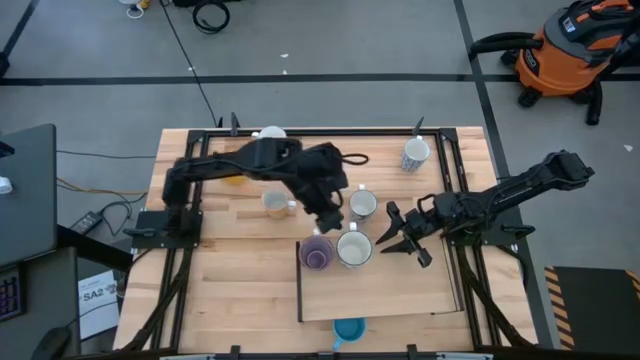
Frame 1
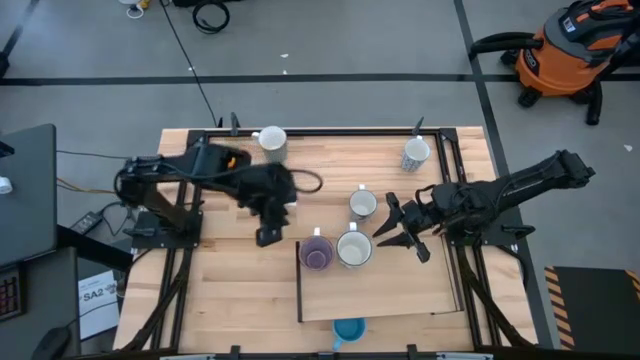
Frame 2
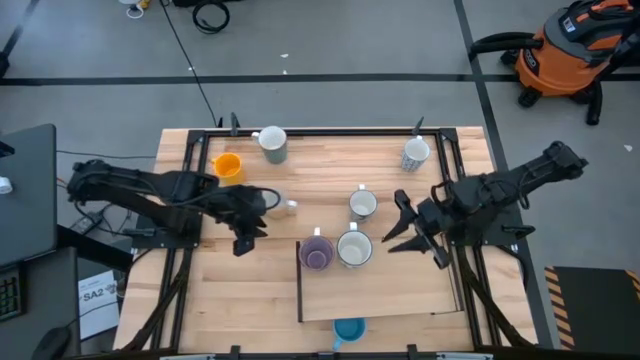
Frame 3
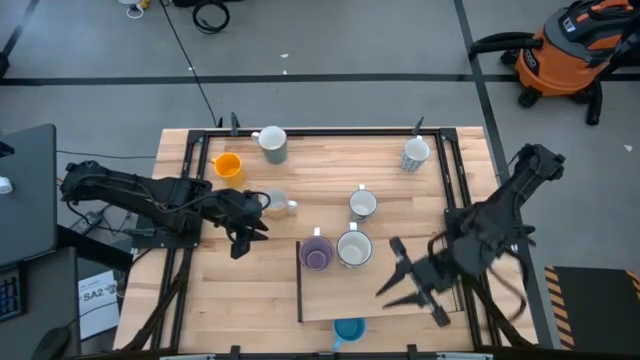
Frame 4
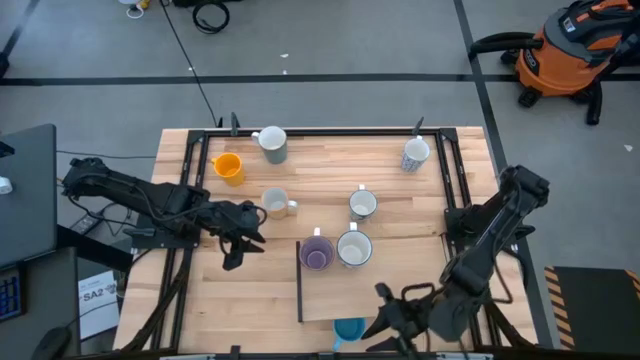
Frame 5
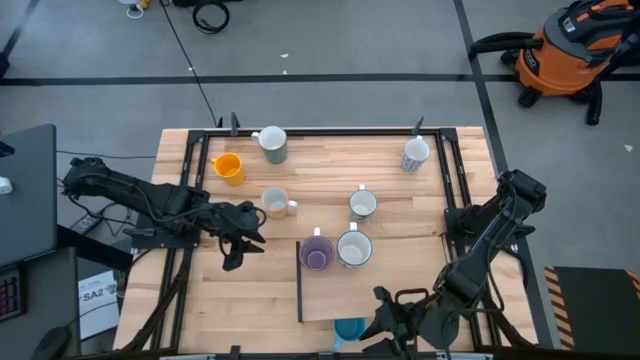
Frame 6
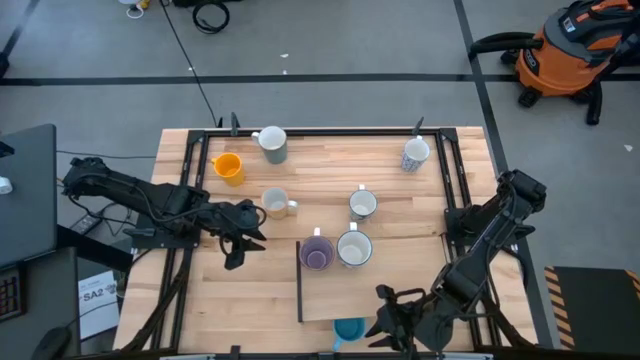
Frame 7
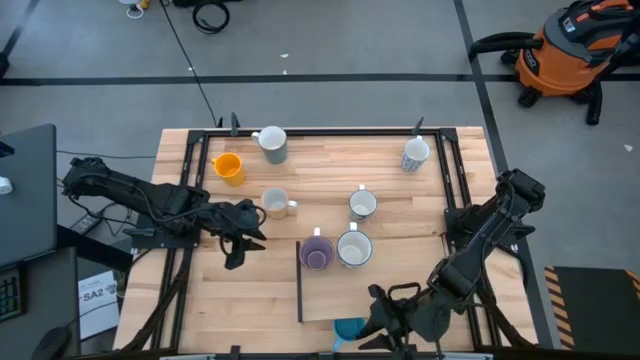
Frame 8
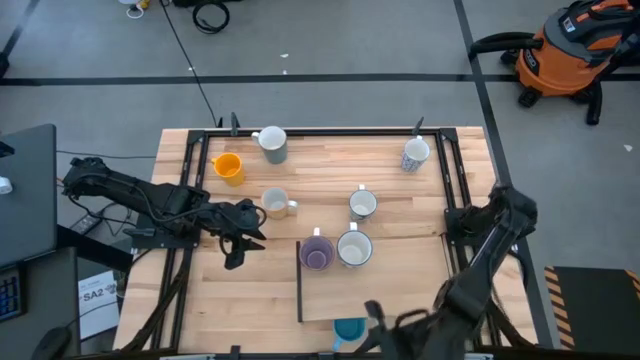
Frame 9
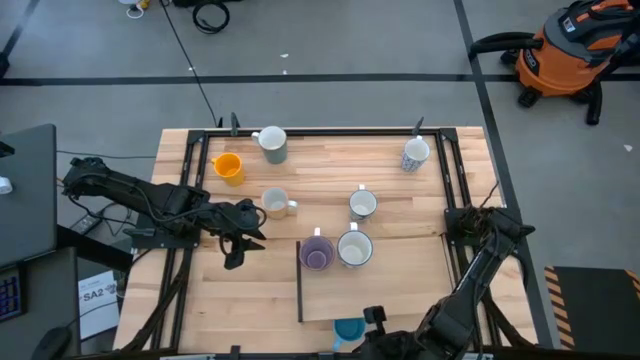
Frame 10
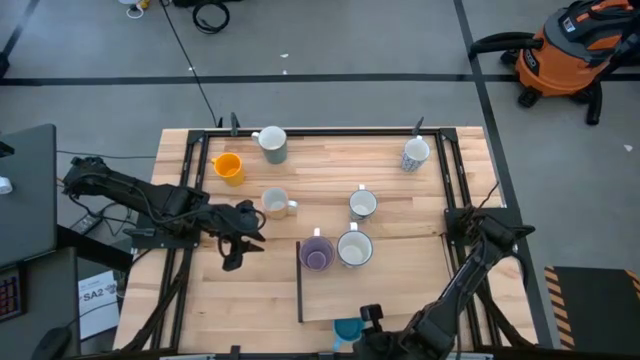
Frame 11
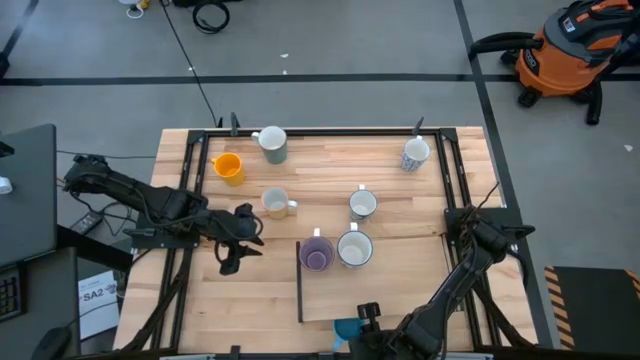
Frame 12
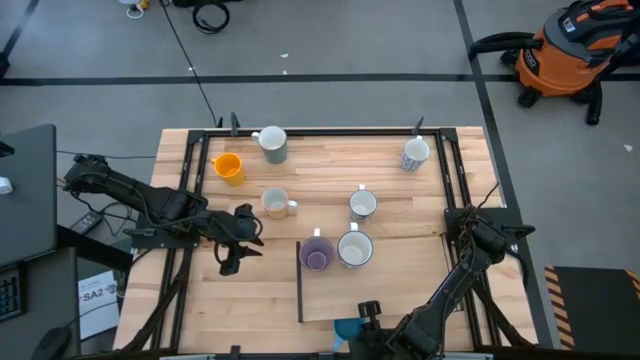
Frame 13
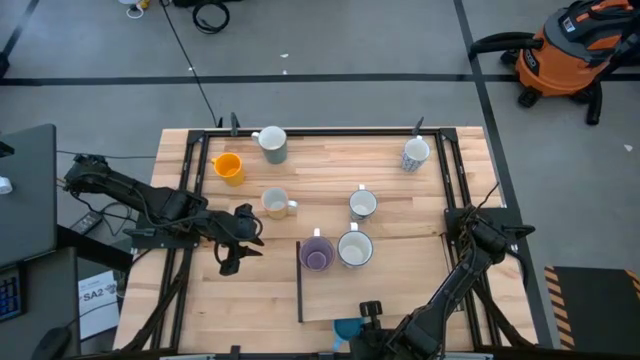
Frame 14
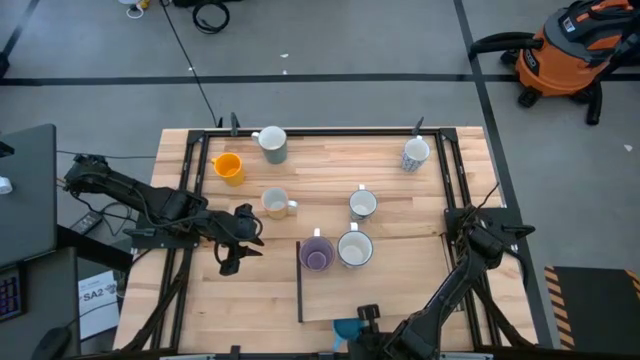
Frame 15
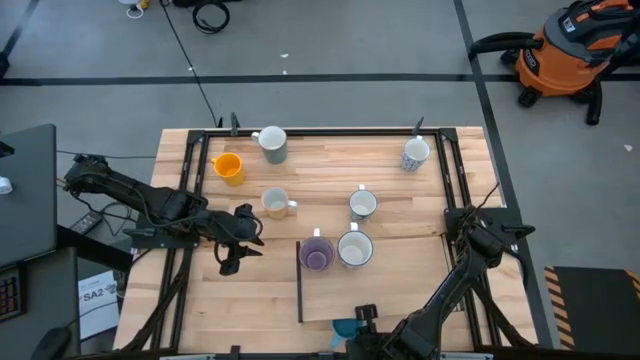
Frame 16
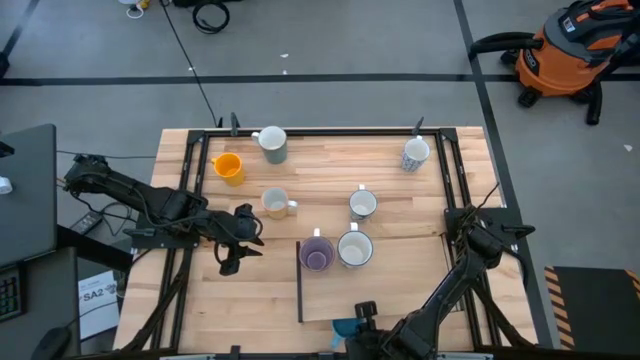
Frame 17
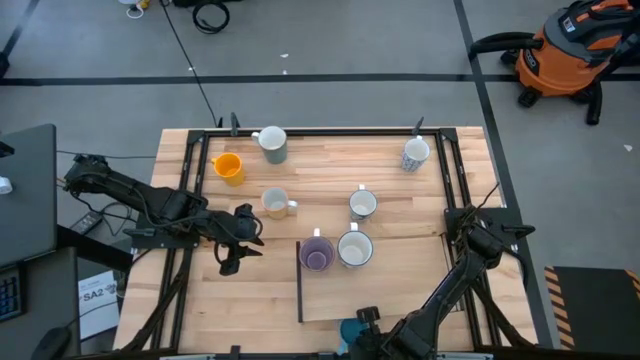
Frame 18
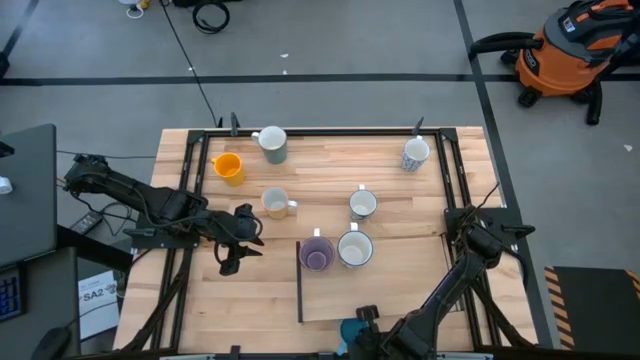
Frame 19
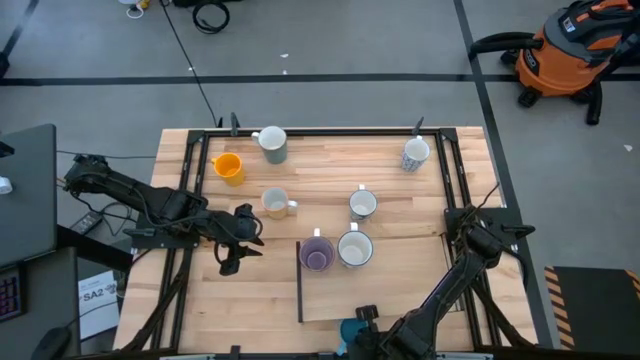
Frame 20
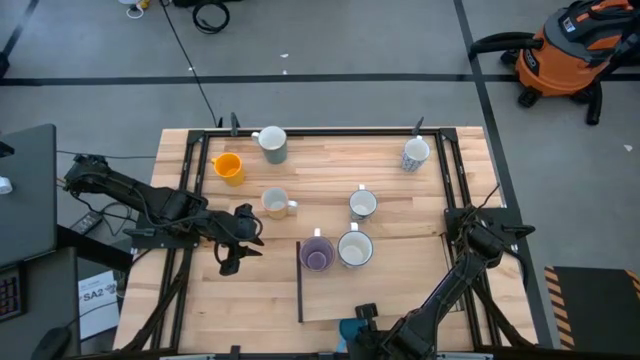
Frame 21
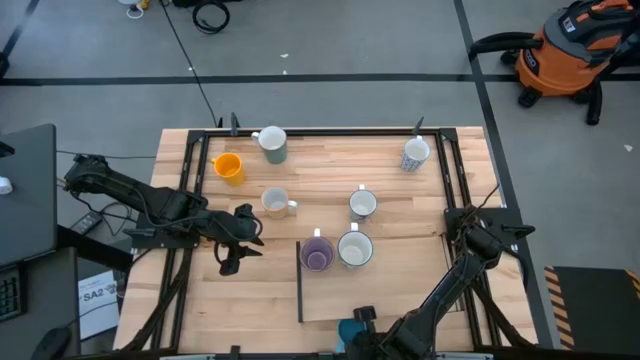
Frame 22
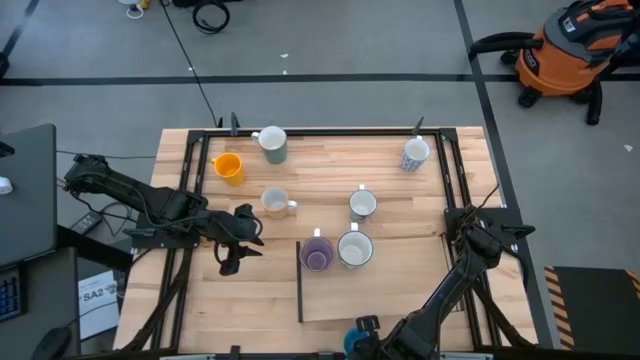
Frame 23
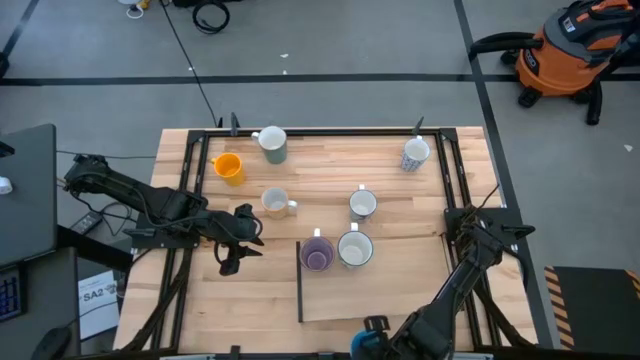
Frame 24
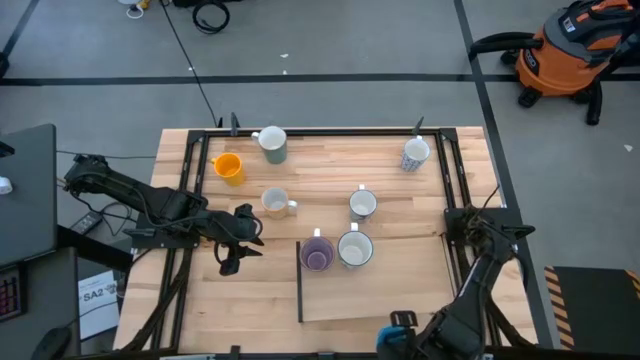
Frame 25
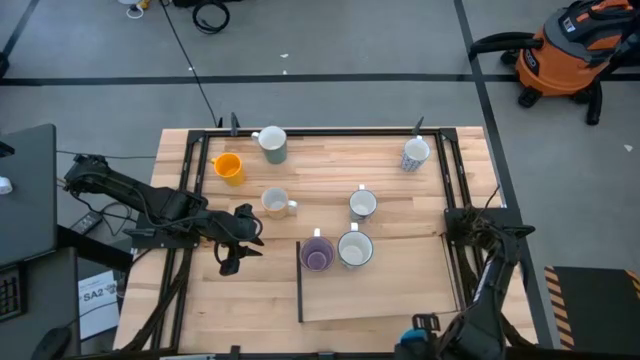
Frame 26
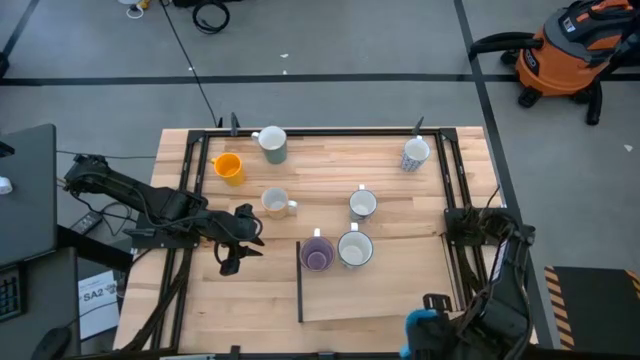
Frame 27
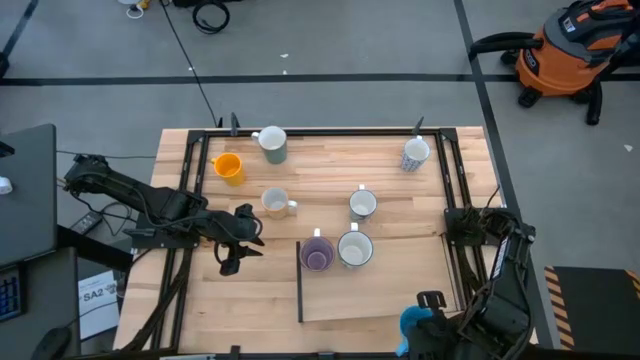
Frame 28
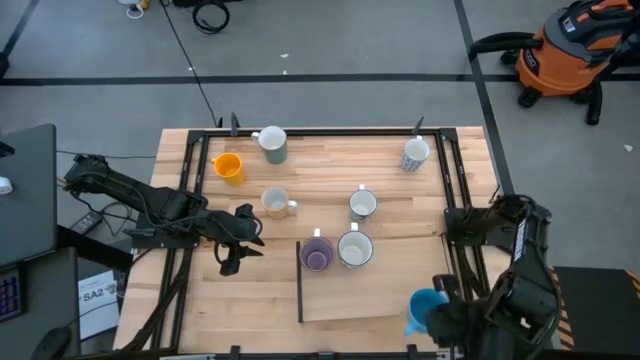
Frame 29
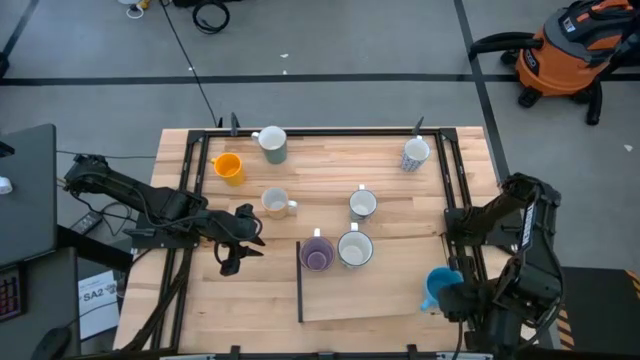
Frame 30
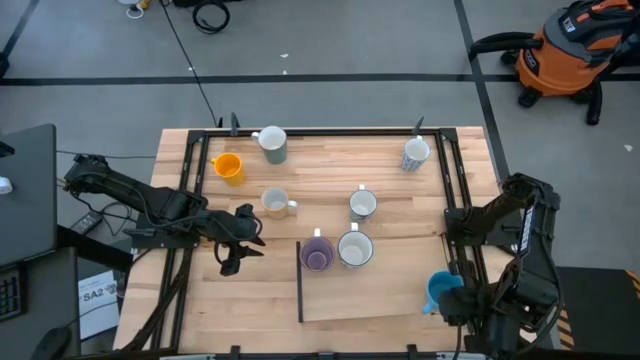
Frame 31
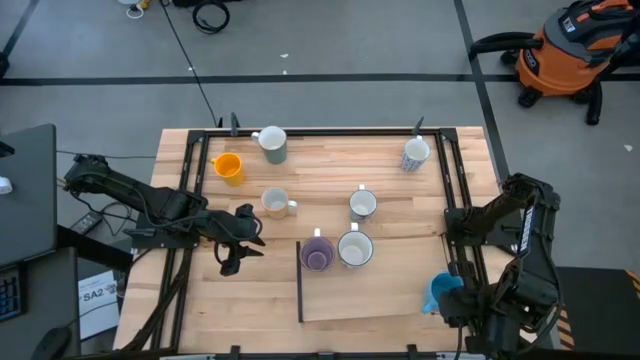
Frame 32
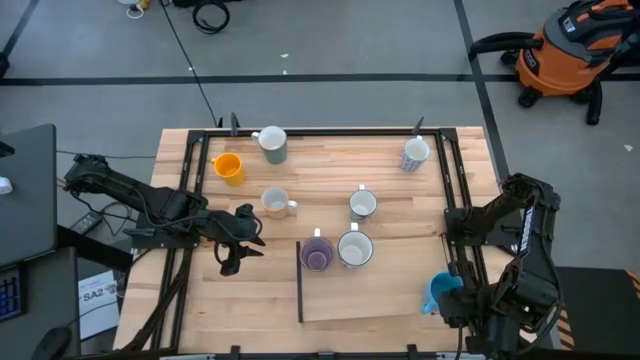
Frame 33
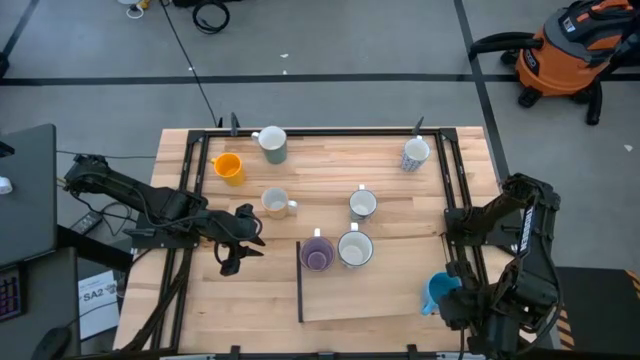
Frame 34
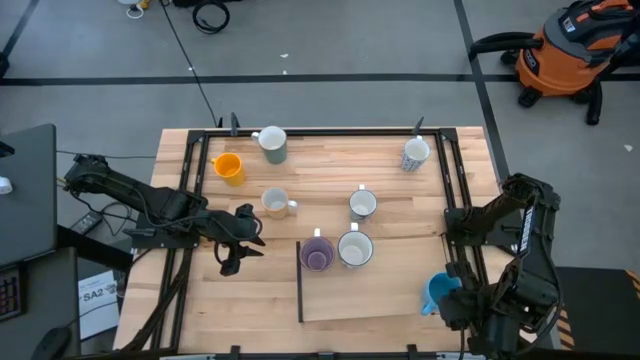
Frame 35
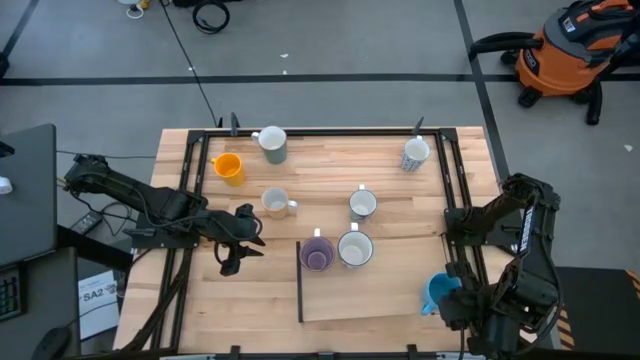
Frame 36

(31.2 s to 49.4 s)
Task: Place coffee mugs
Put the light blue mug on the shelf

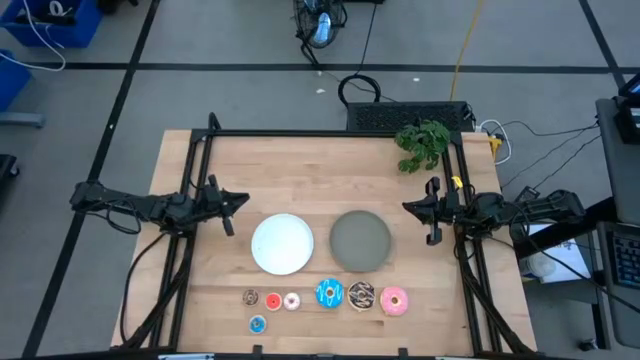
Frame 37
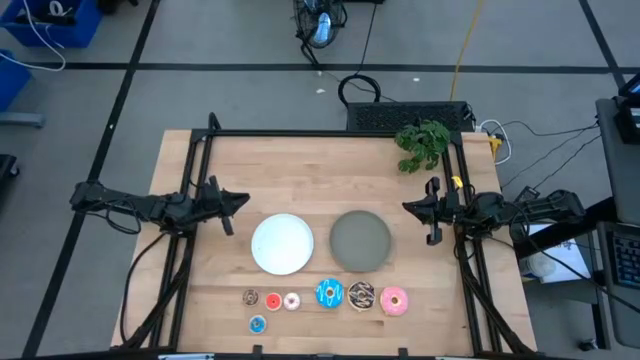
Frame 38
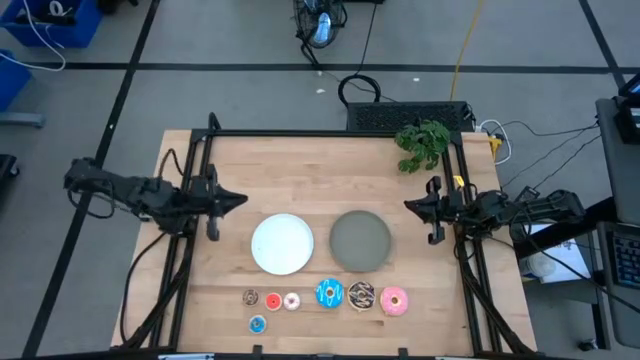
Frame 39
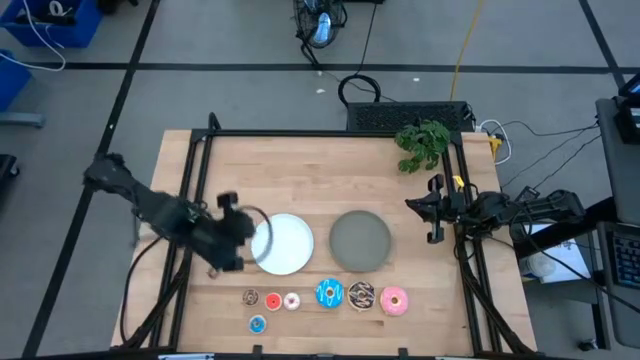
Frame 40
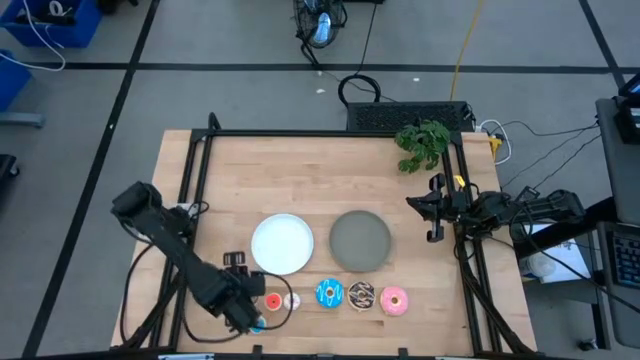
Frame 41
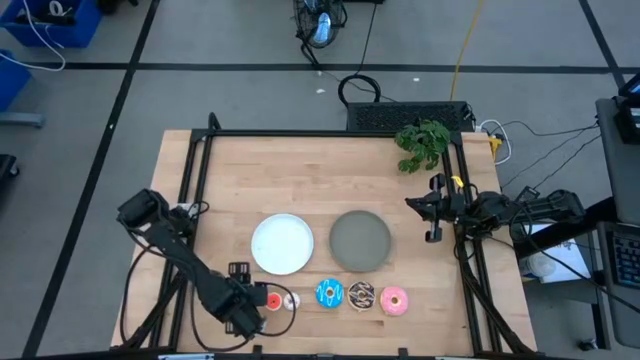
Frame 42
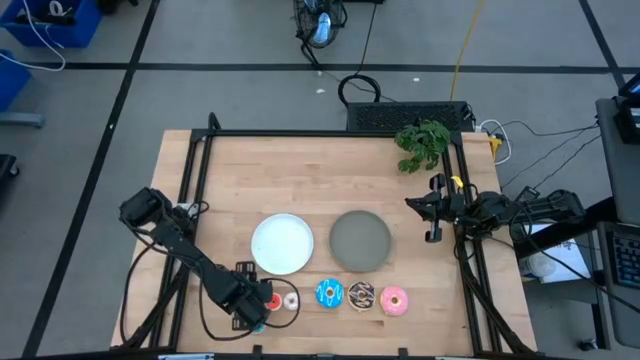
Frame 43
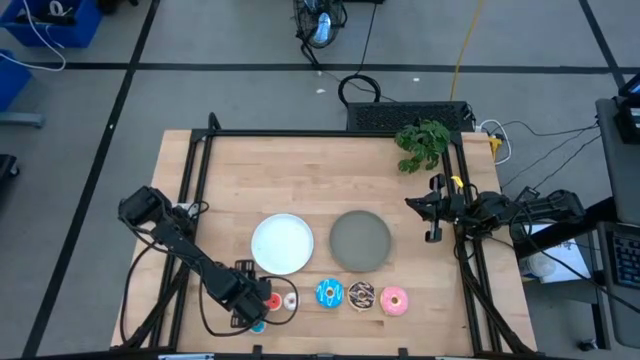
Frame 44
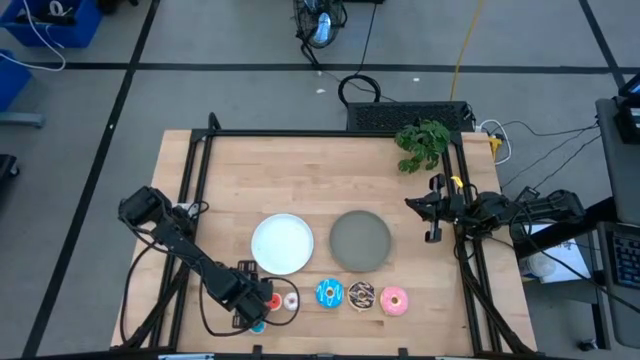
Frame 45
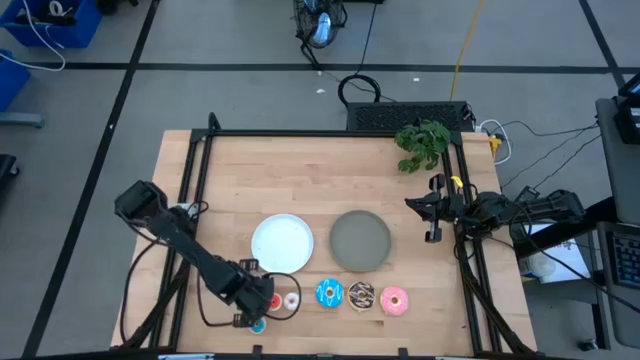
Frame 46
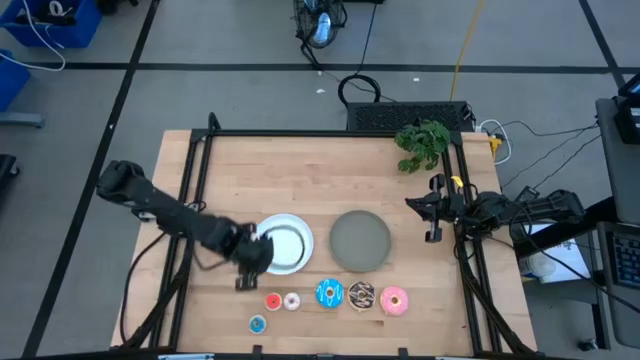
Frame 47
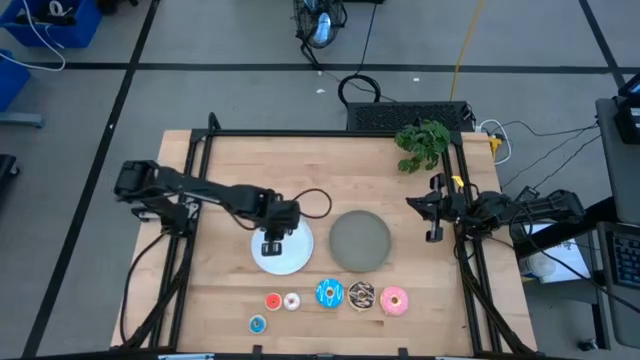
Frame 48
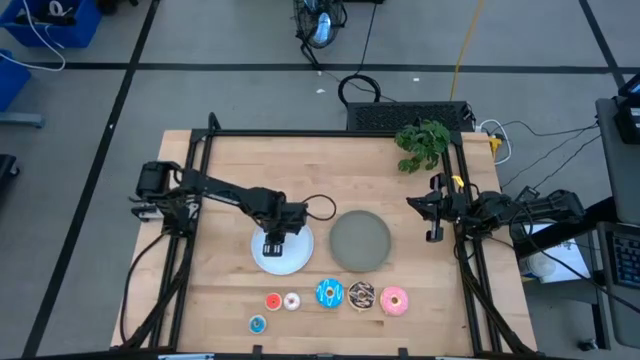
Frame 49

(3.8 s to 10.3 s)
Task: Pick & Place donuts
Put the small brown donut on the white plate
